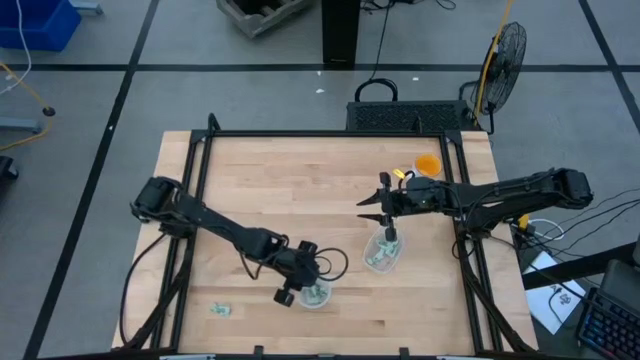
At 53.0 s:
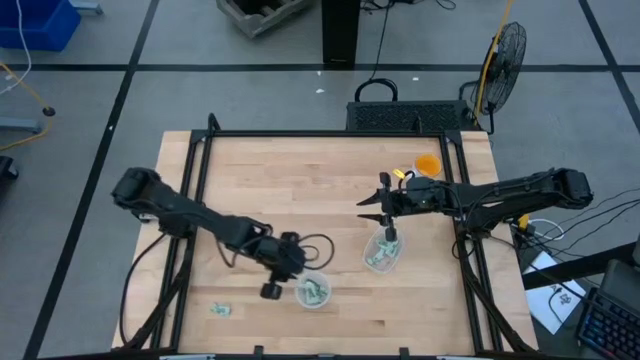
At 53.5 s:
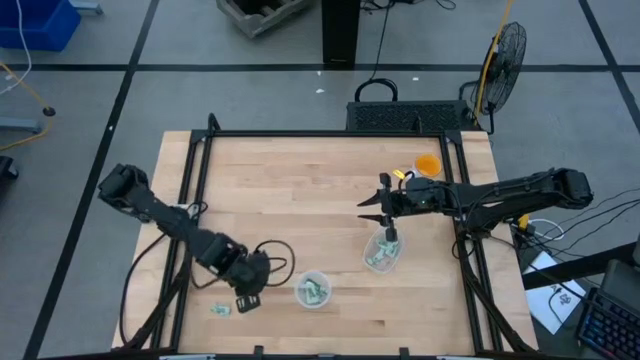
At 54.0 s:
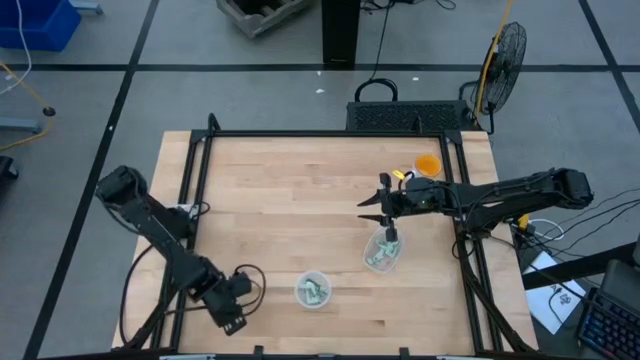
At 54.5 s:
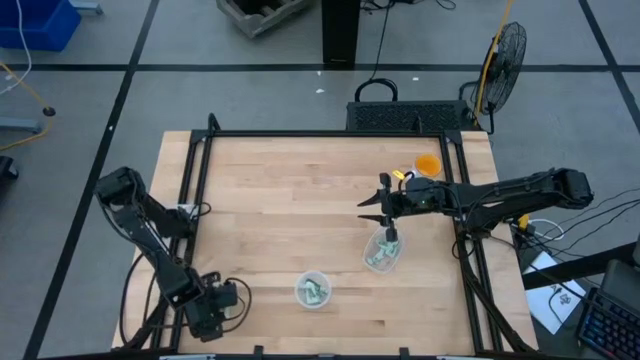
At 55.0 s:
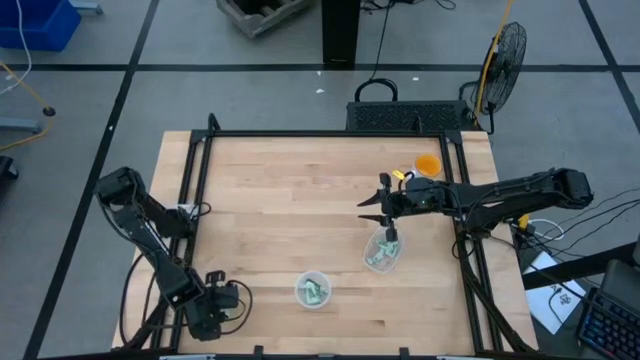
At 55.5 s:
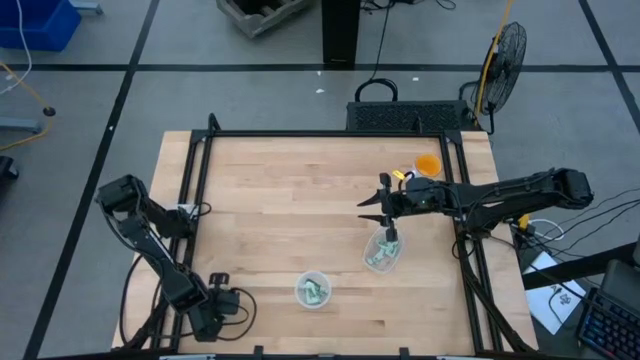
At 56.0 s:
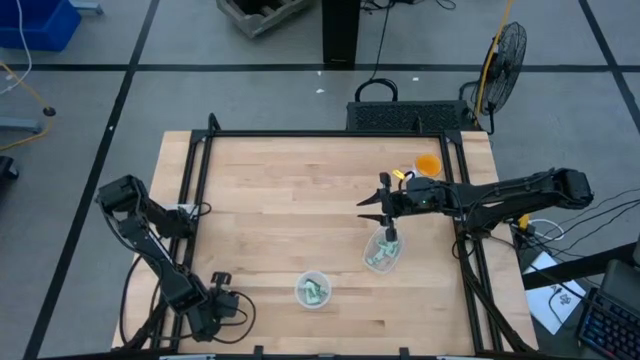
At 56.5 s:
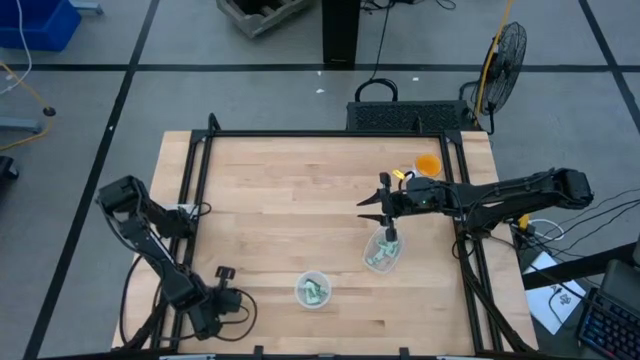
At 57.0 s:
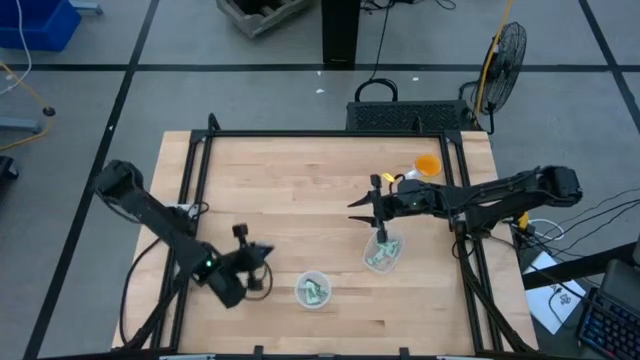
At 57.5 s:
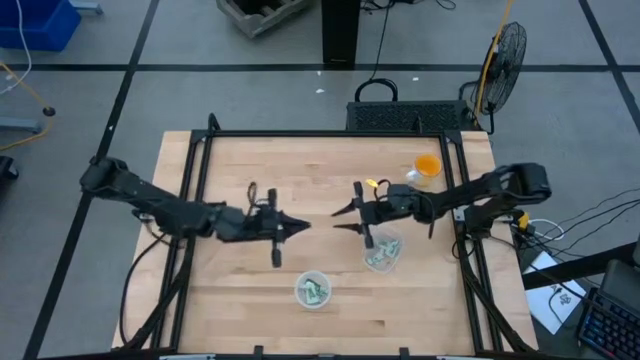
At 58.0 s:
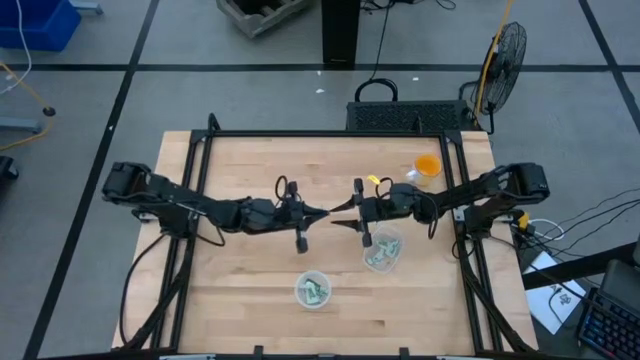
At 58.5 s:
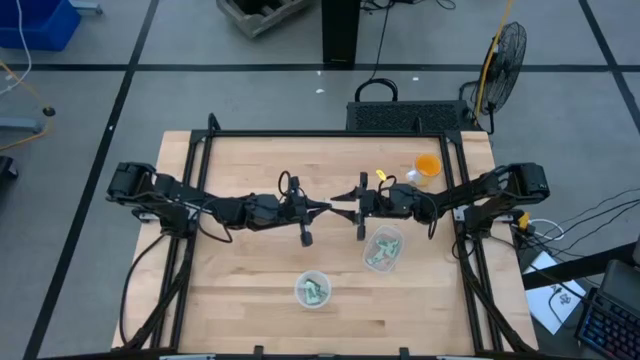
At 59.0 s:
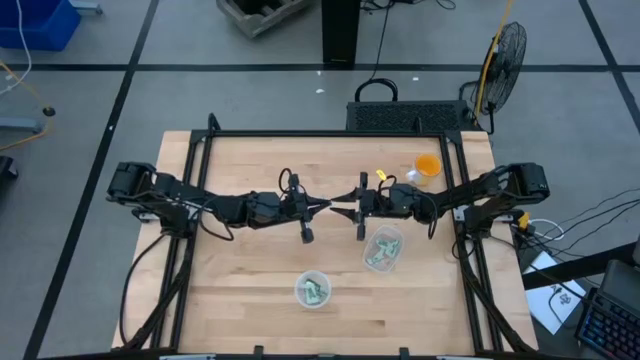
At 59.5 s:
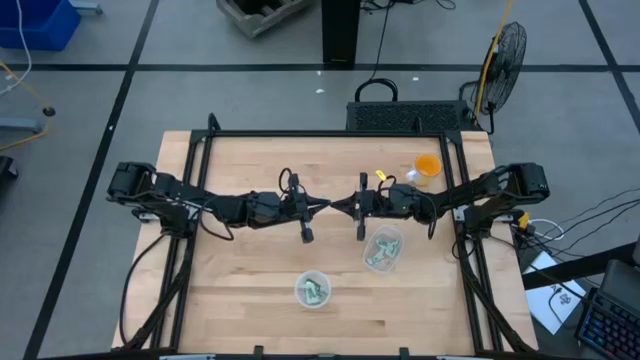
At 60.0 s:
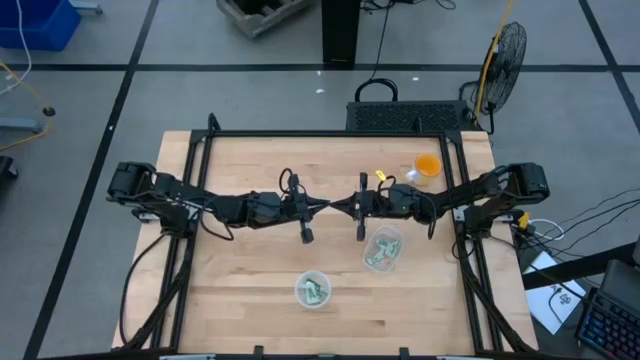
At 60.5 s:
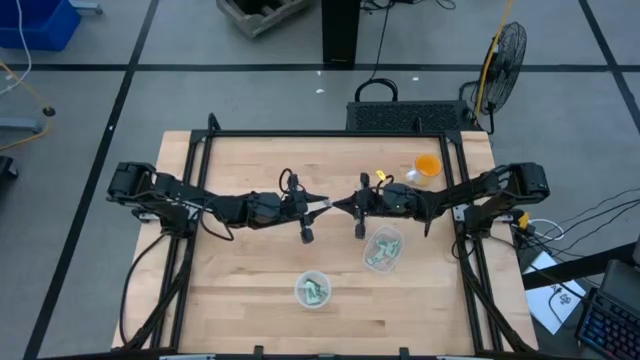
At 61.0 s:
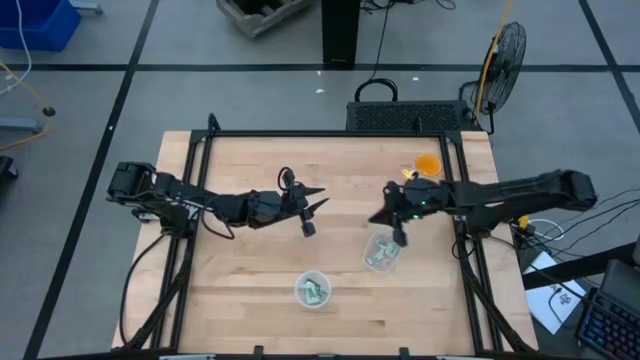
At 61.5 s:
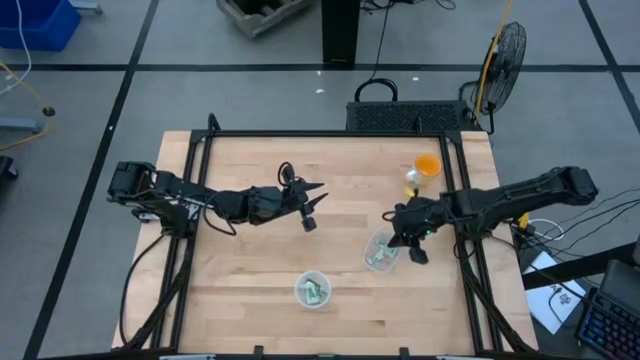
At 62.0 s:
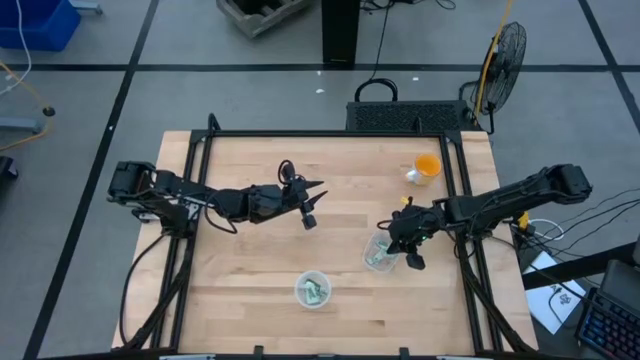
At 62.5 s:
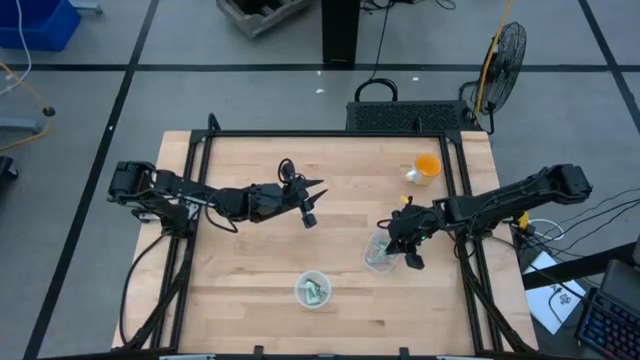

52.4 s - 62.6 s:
Task: Pick and place items into bin
Put the Stevia packet into the right transparent bin

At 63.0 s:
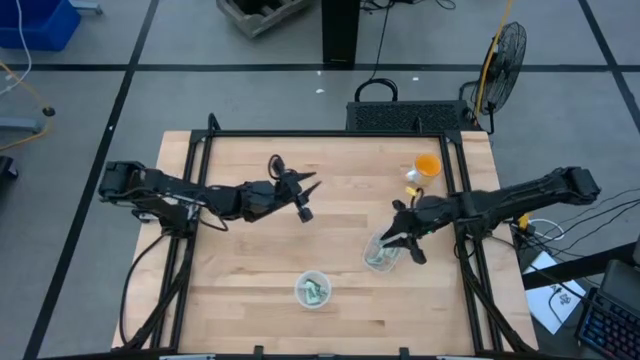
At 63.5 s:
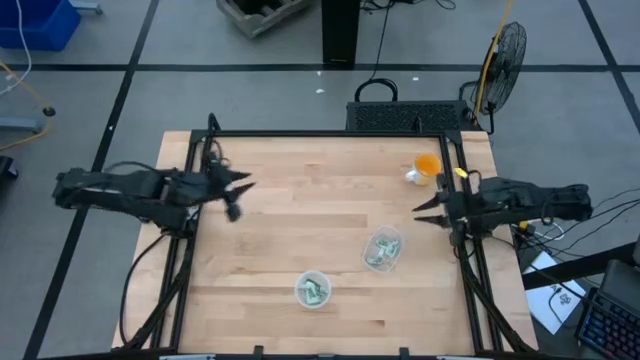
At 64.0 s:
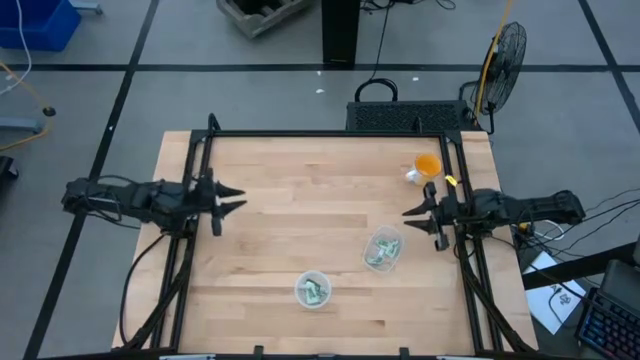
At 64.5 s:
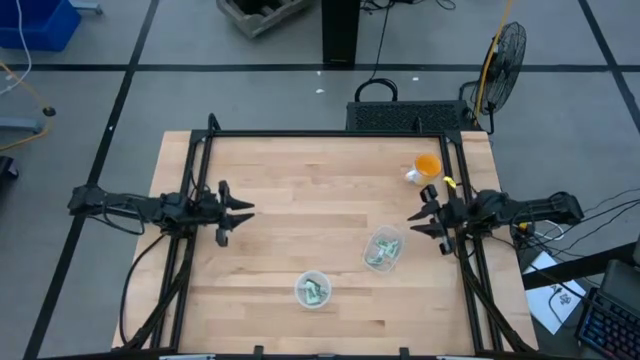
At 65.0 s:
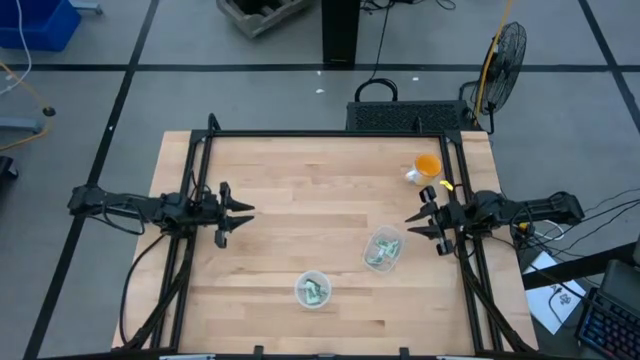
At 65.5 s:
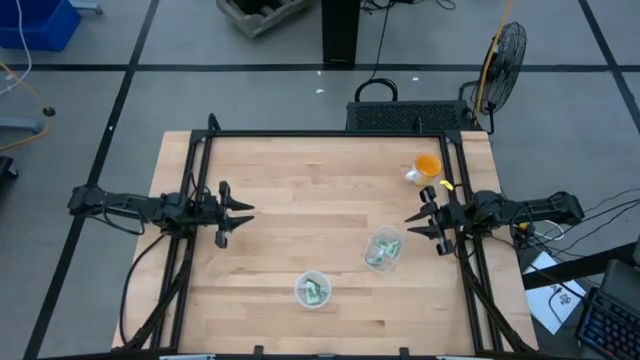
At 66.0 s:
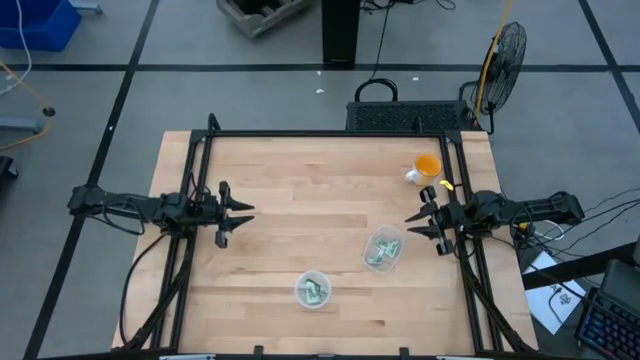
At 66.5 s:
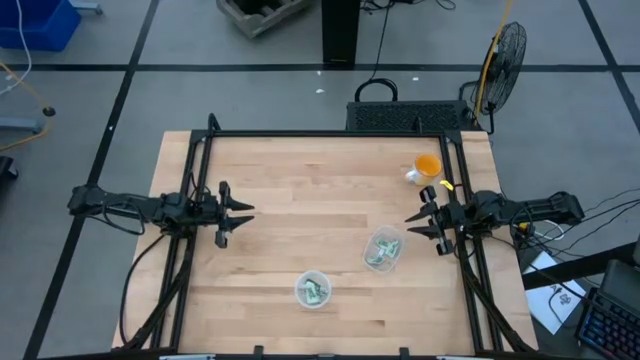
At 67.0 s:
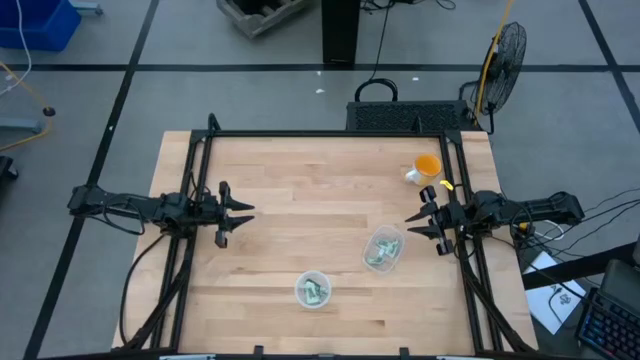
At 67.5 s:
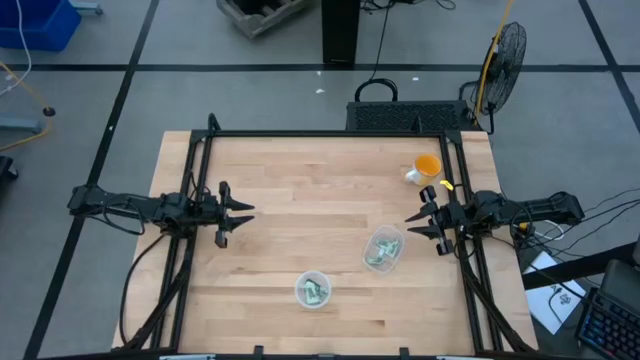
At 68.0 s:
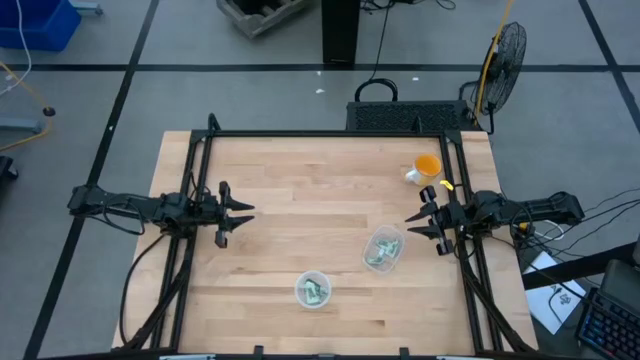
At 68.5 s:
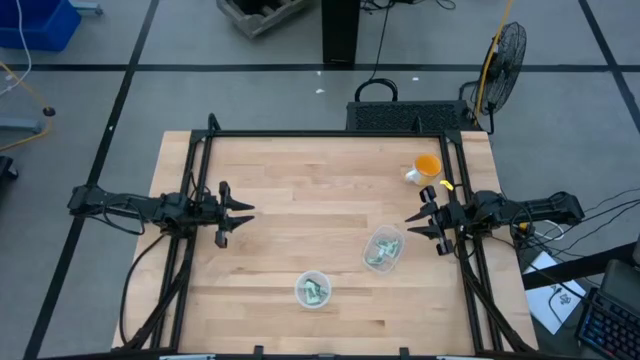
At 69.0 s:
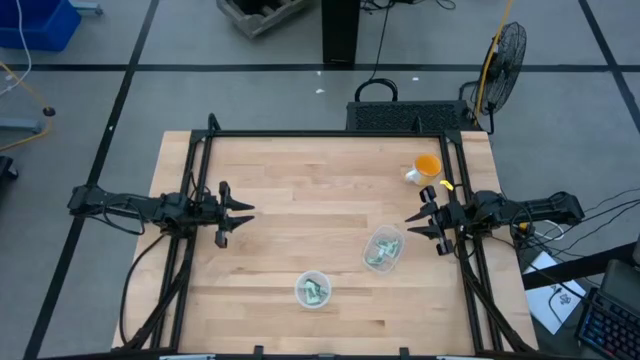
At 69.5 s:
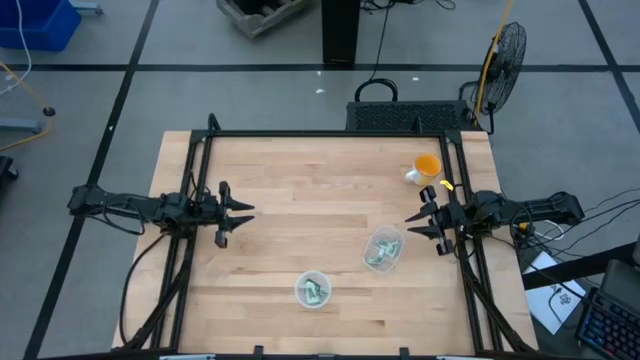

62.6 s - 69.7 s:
Return to Home Position

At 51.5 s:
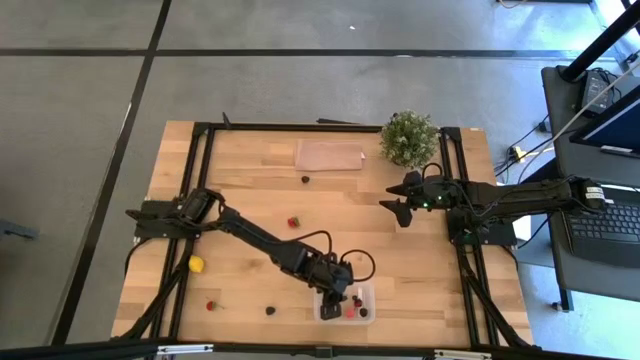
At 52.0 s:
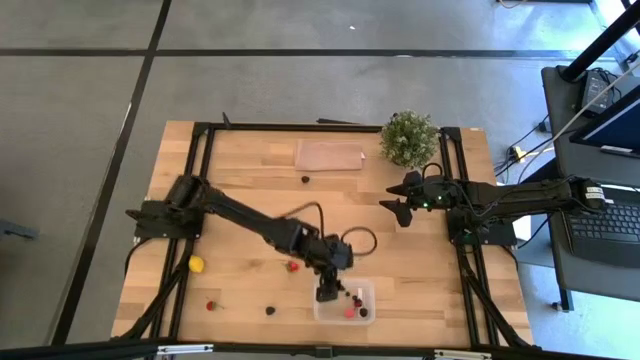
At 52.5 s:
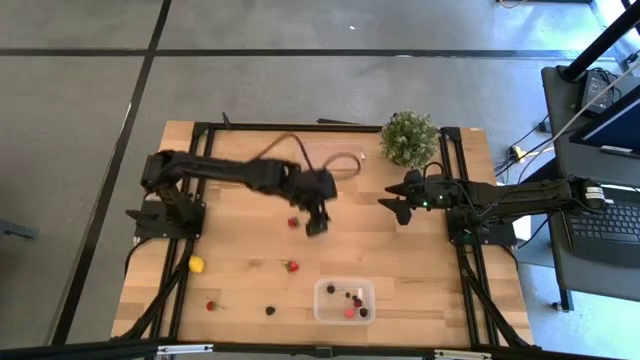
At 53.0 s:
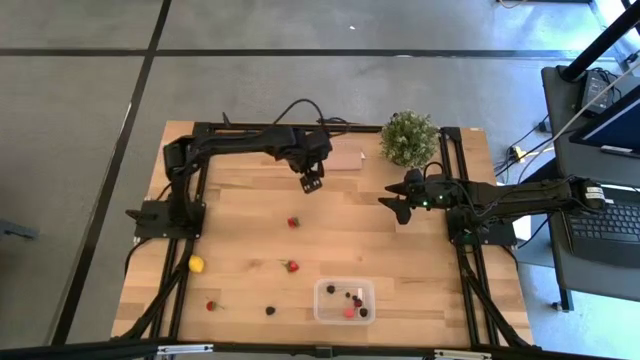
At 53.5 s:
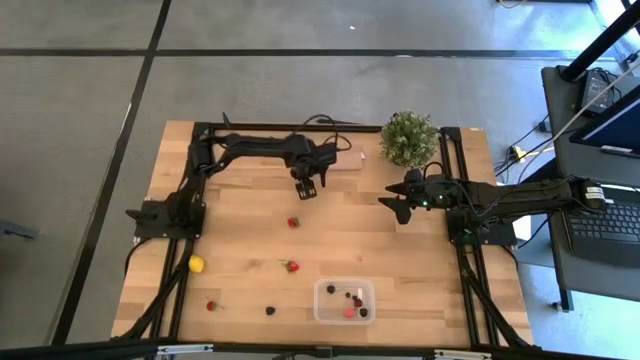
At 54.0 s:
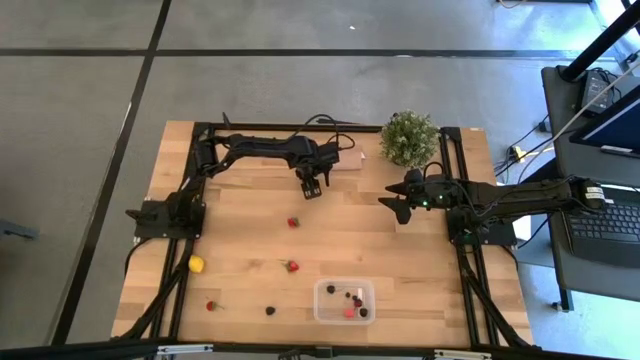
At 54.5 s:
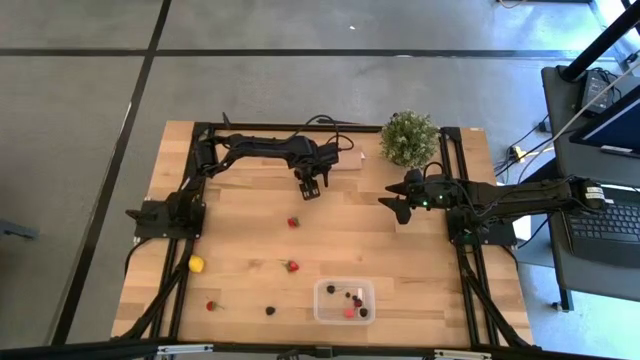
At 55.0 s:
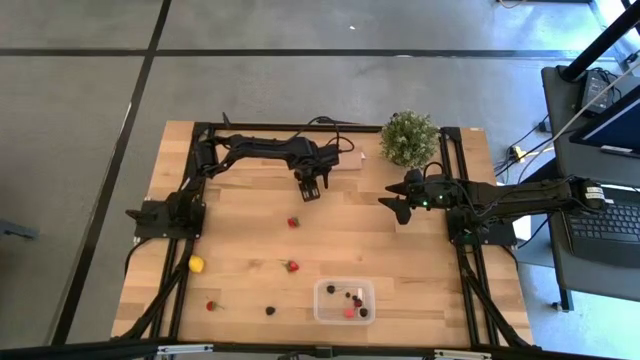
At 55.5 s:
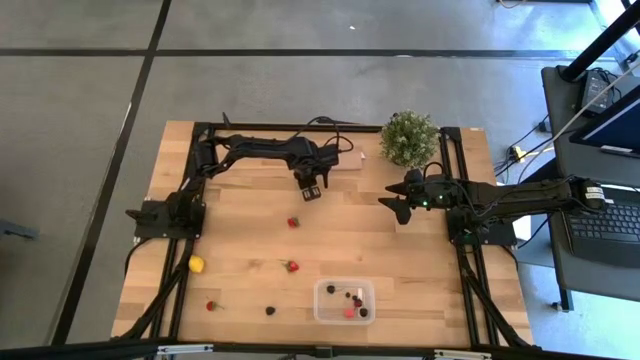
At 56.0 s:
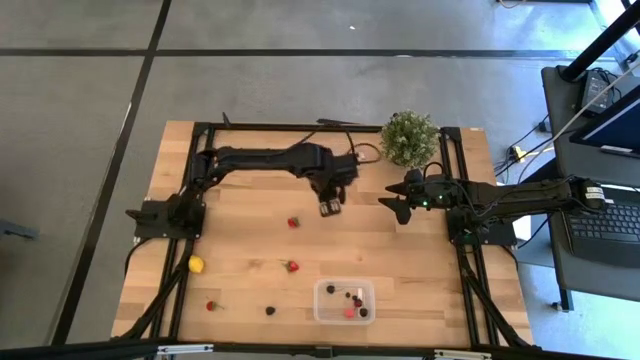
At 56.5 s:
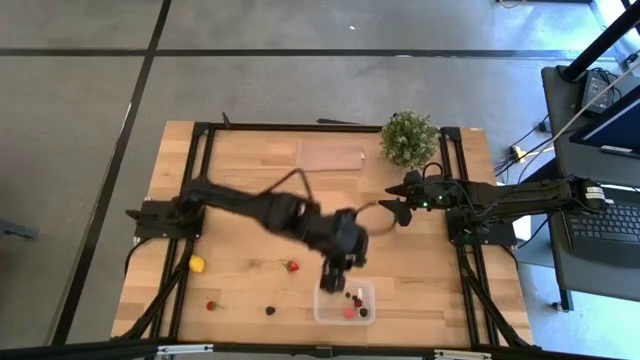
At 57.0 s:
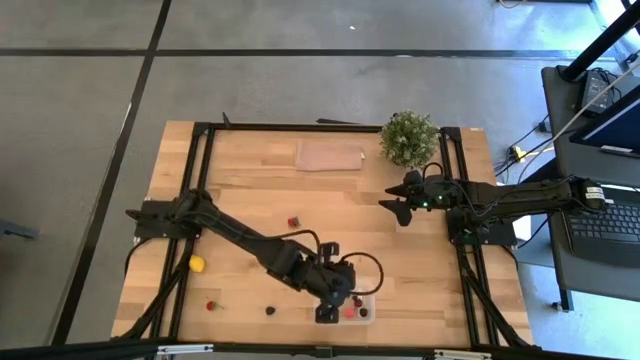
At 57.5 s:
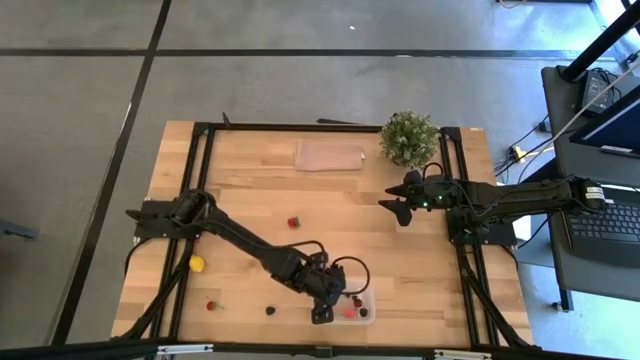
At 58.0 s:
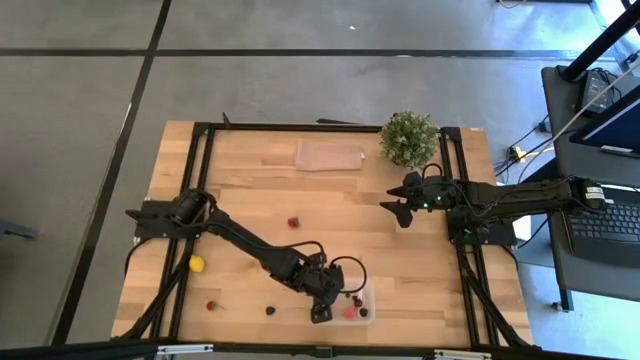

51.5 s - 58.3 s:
Task: Pick and placing Produce into tupperware
Put the top blackberry into the transparent container
